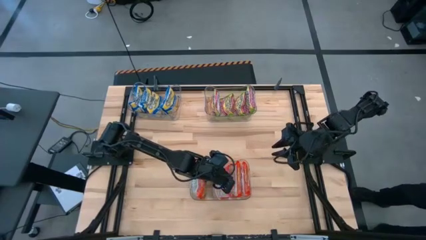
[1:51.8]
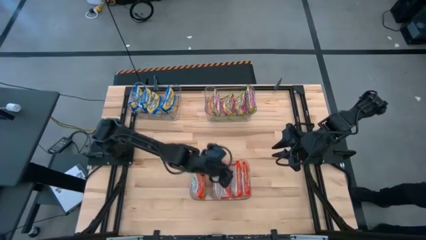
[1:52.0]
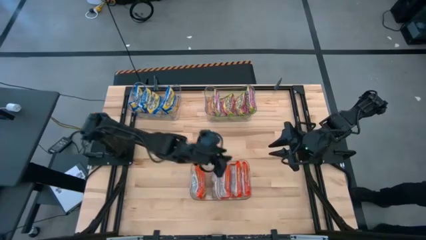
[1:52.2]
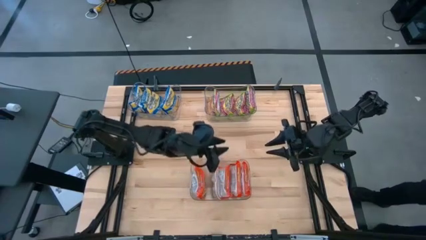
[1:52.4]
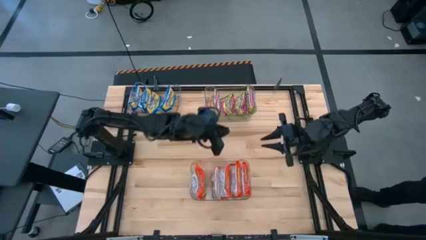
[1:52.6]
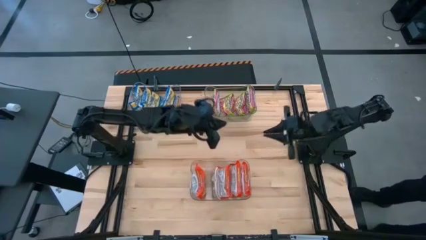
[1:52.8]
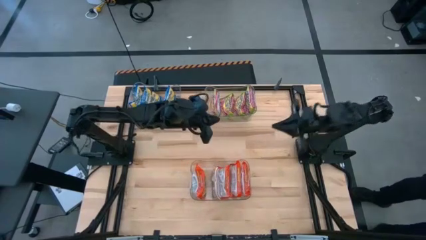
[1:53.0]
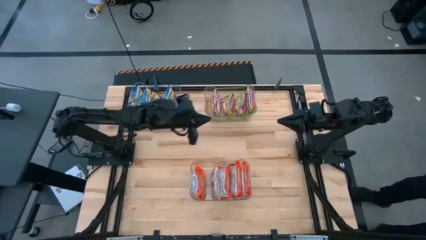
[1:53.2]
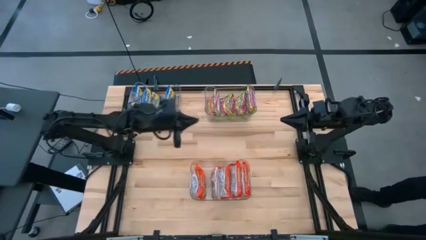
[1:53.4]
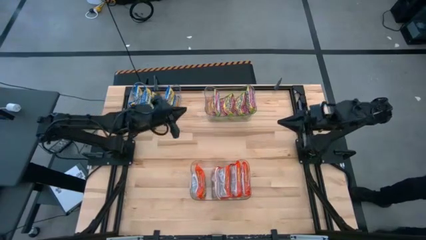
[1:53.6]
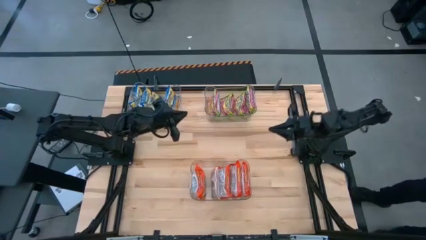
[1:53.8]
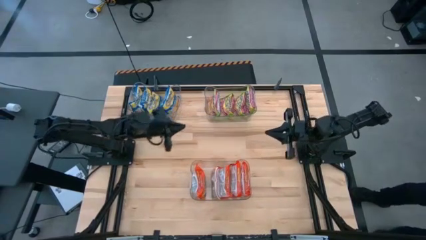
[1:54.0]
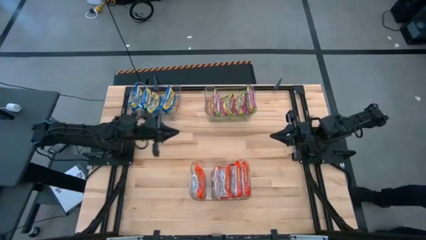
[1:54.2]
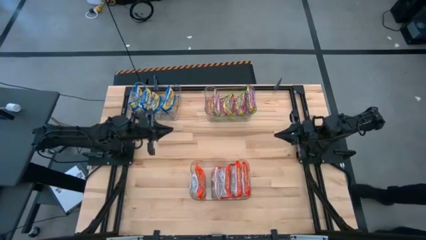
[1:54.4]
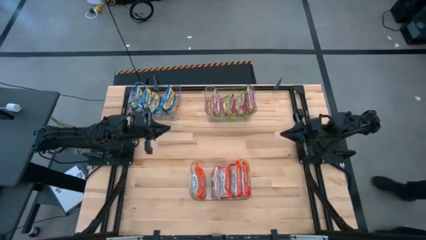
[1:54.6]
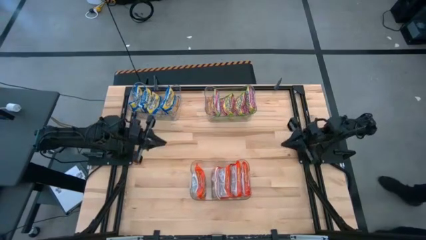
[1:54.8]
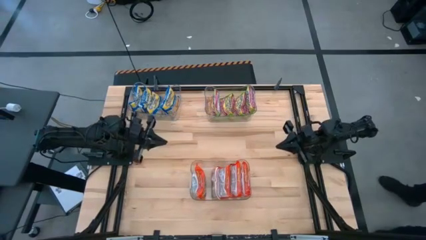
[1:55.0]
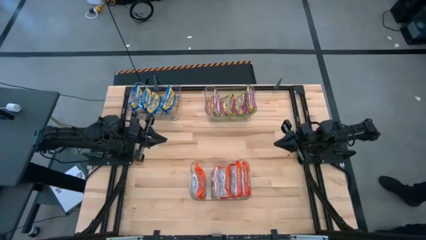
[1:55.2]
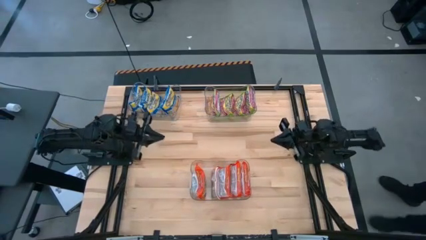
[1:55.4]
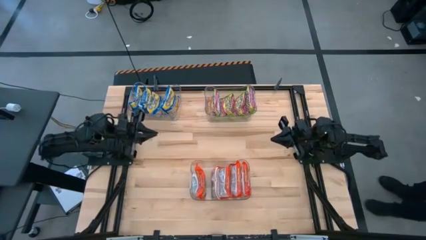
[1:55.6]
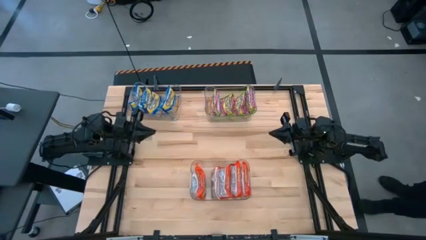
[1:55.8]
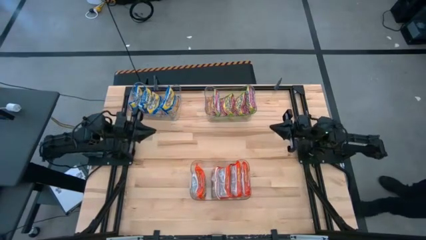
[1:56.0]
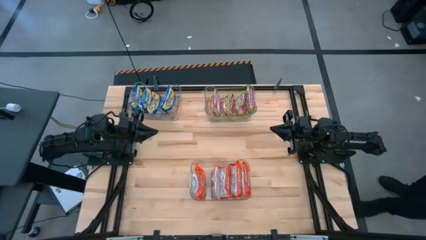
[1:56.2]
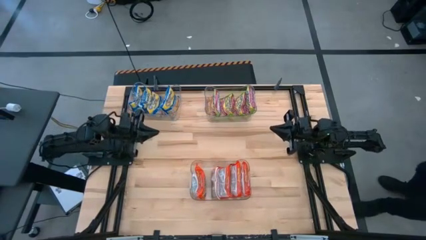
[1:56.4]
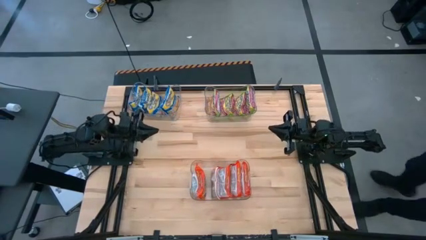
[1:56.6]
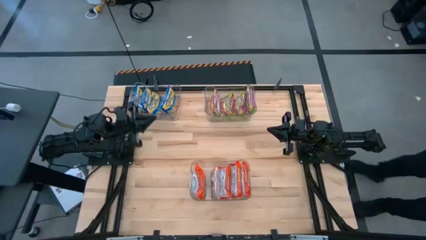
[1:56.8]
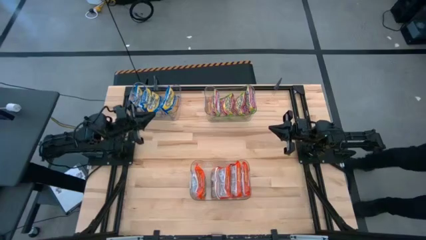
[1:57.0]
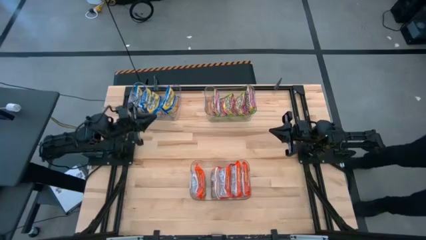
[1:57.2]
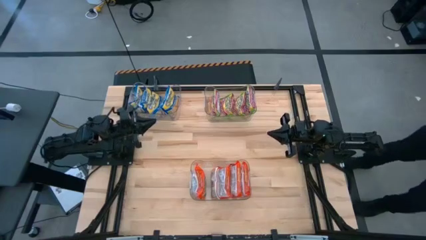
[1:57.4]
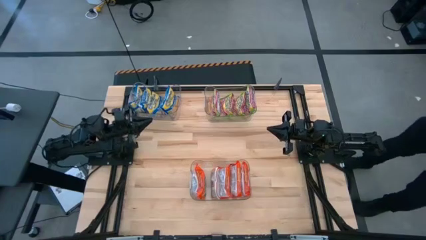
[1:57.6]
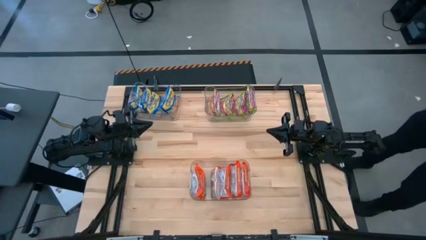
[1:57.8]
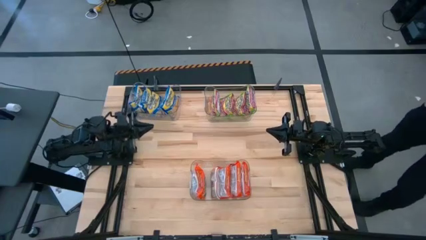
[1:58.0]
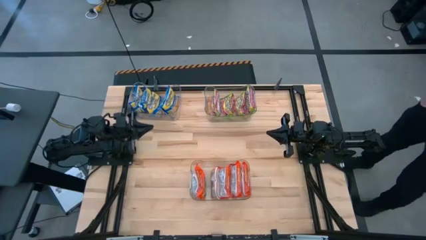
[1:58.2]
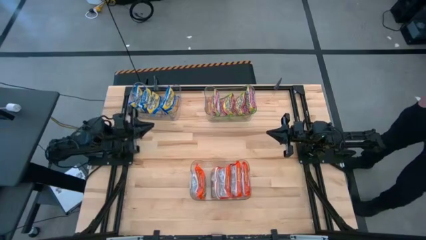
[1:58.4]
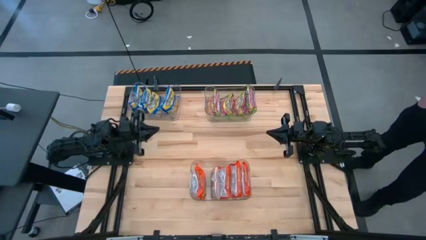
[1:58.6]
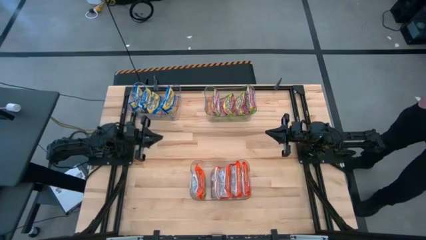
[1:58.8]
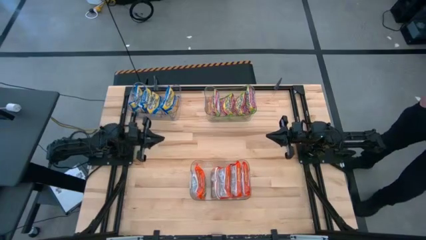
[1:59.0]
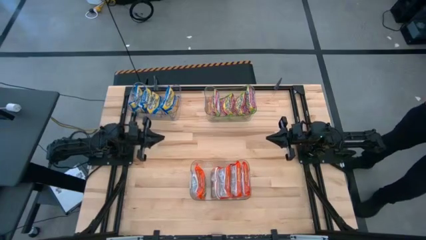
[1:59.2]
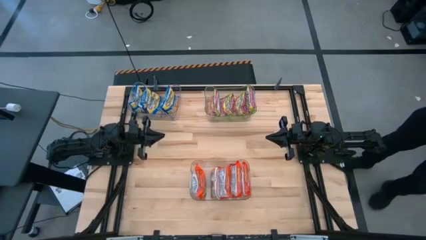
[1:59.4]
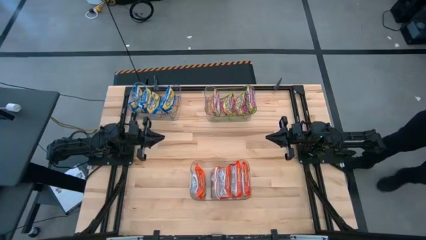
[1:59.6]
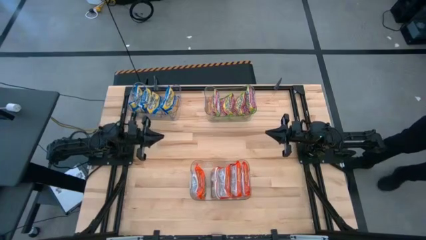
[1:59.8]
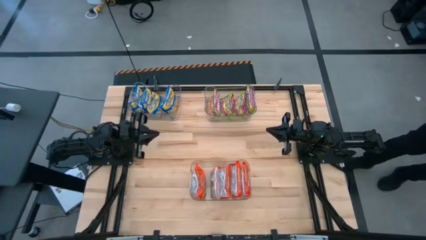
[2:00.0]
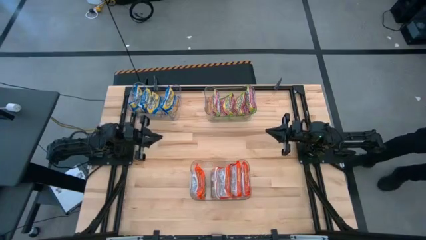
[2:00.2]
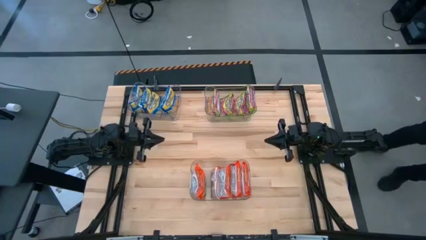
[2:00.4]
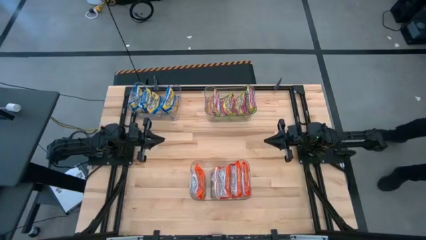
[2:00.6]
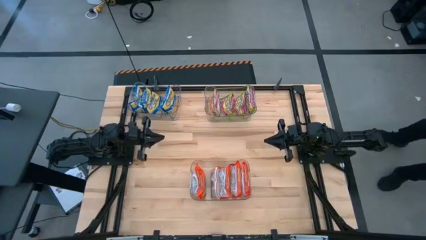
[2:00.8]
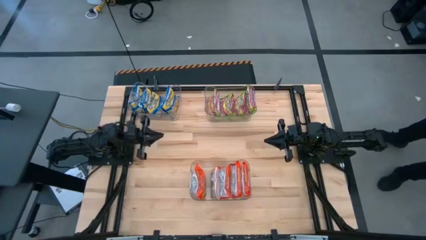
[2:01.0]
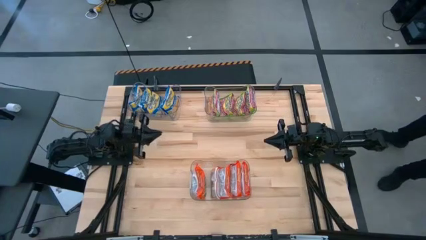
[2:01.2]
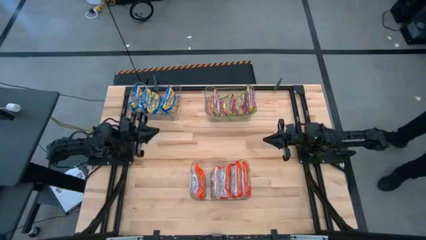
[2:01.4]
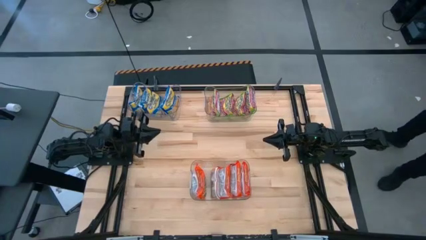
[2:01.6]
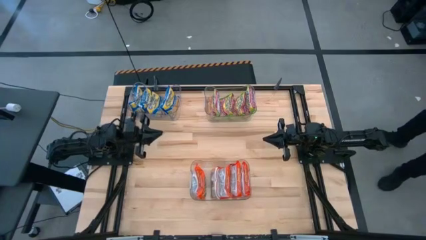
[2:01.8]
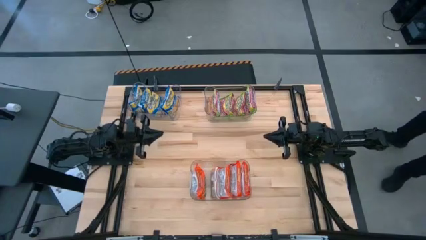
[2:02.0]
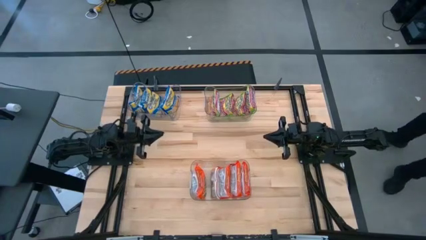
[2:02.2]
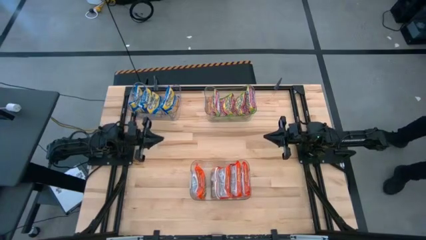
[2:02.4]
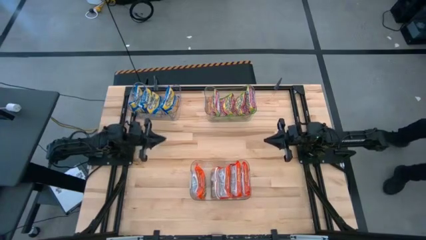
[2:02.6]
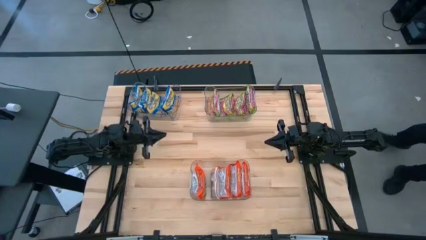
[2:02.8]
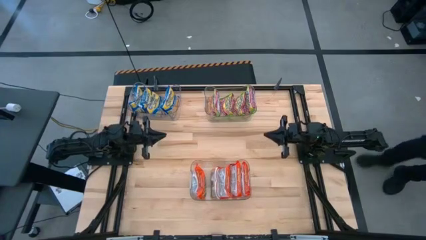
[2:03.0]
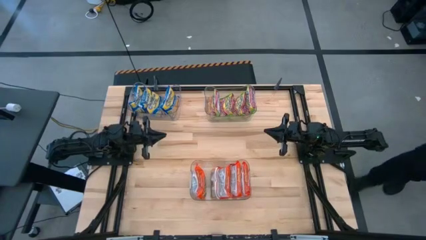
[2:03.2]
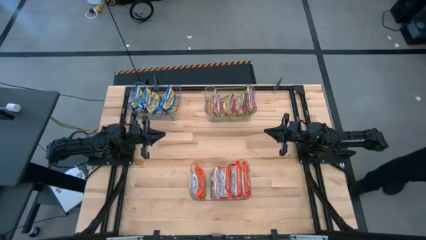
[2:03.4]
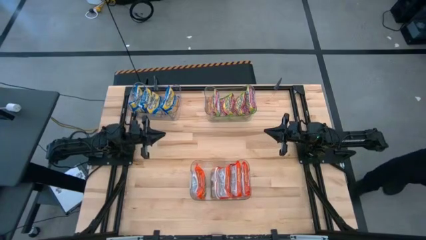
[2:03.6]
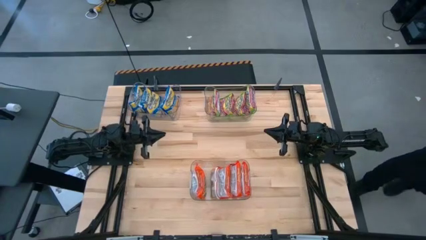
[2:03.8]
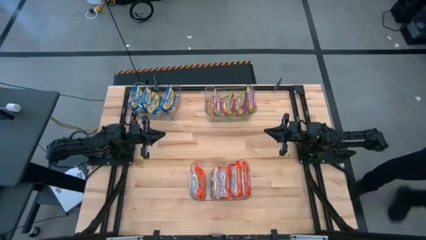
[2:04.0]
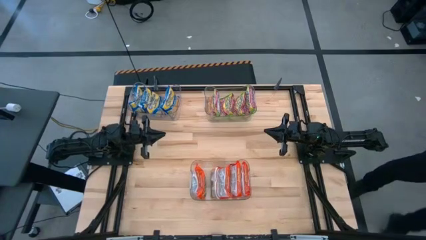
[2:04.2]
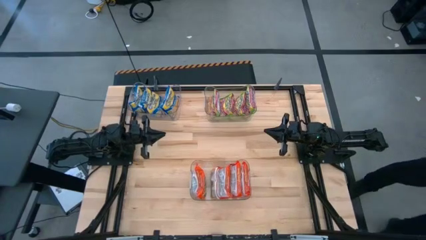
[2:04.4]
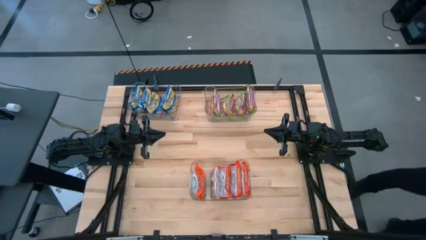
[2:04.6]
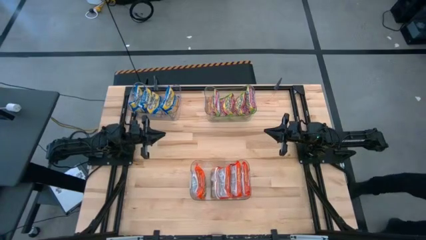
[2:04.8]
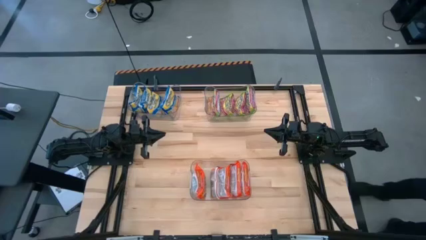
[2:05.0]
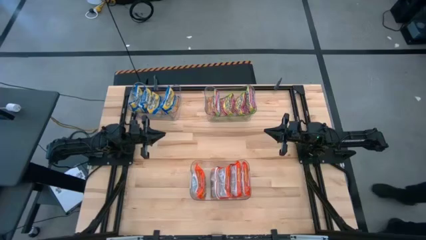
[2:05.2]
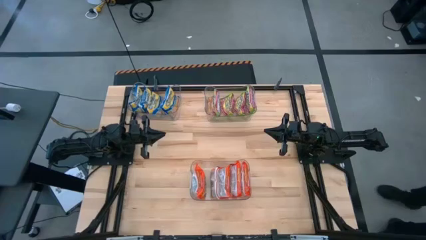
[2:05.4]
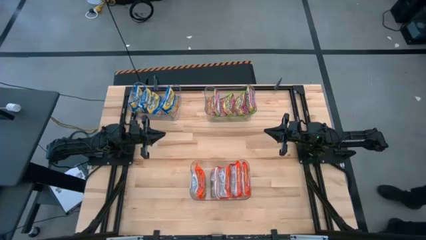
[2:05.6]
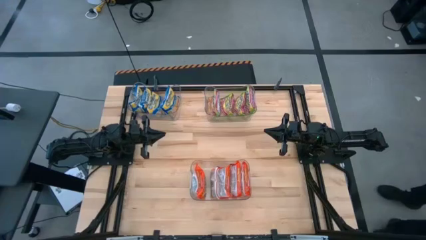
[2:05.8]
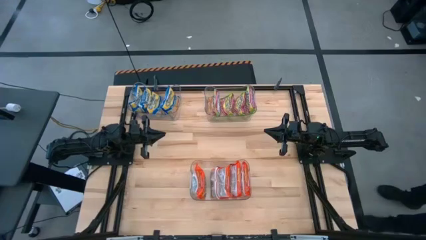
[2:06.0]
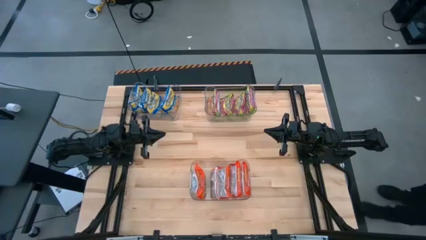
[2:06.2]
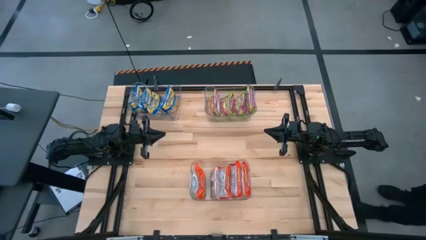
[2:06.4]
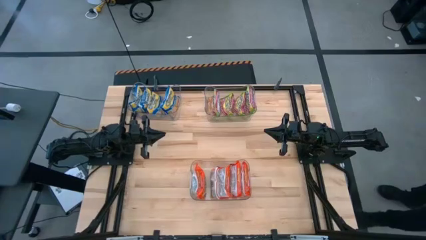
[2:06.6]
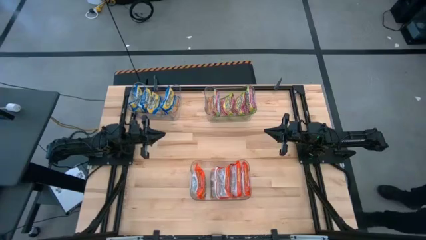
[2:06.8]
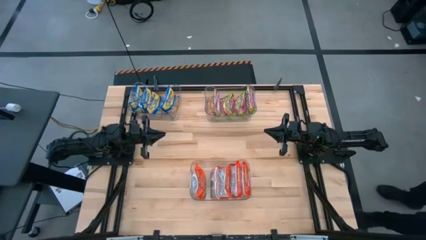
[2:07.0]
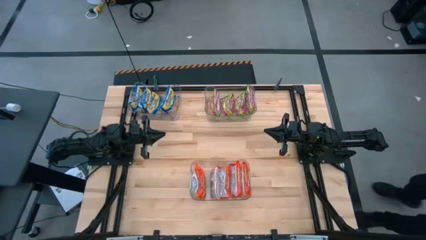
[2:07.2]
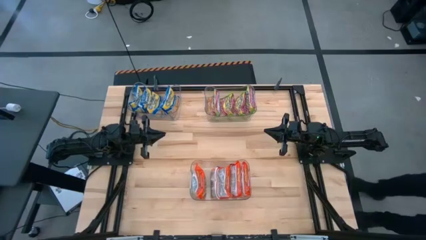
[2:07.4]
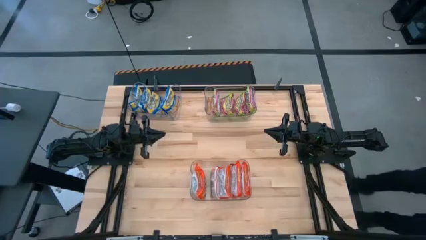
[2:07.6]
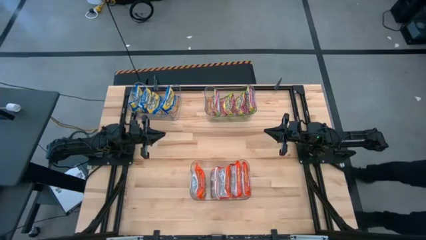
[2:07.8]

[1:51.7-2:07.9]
Task: Sort Maruchan noodles
Return to Home Position
